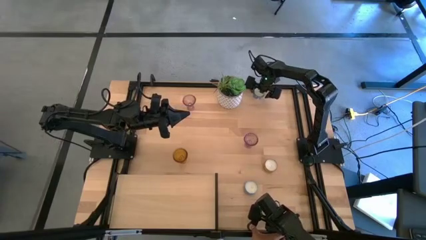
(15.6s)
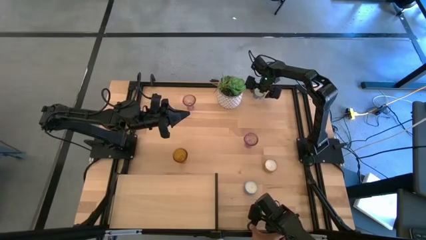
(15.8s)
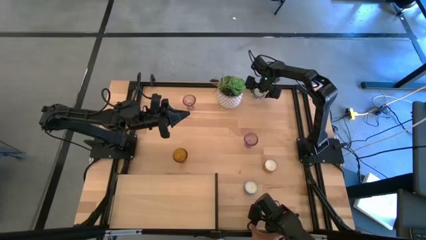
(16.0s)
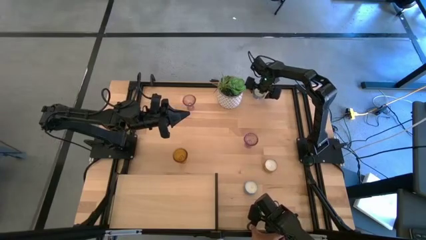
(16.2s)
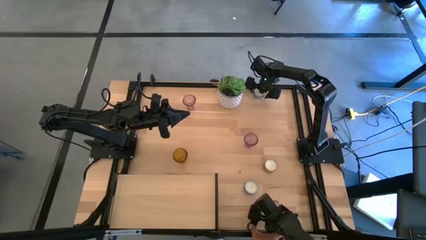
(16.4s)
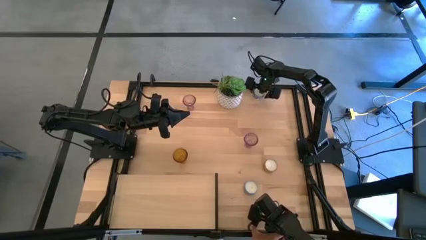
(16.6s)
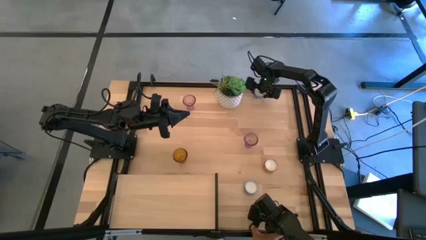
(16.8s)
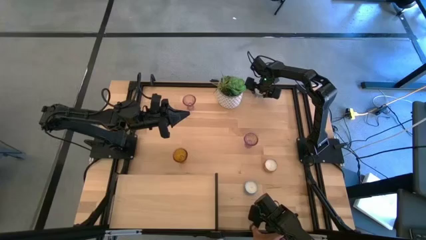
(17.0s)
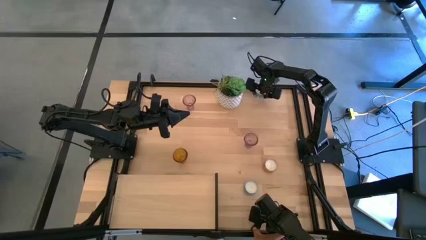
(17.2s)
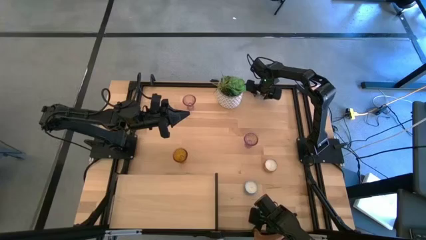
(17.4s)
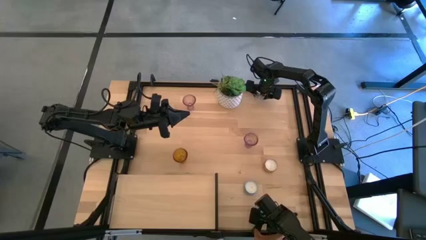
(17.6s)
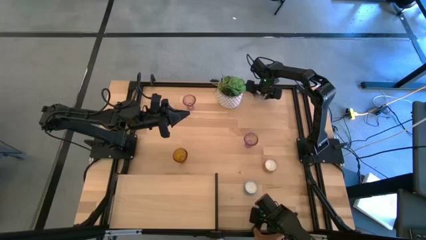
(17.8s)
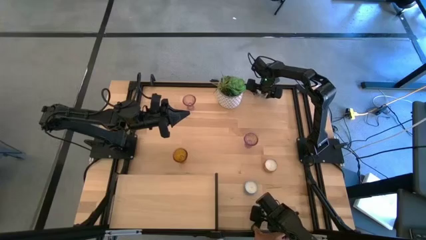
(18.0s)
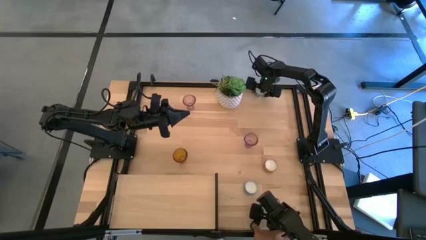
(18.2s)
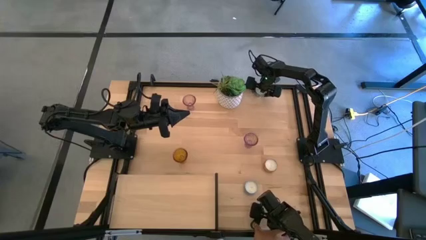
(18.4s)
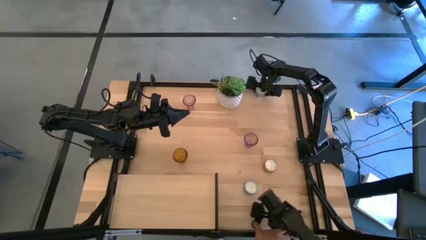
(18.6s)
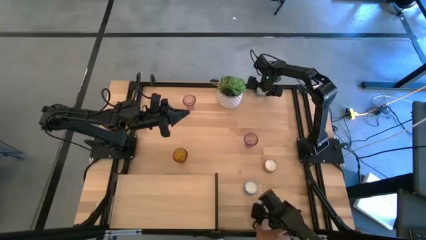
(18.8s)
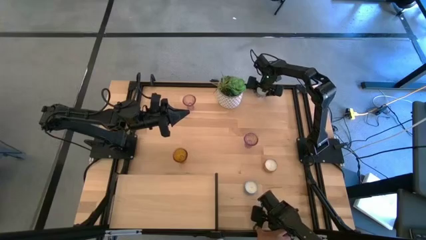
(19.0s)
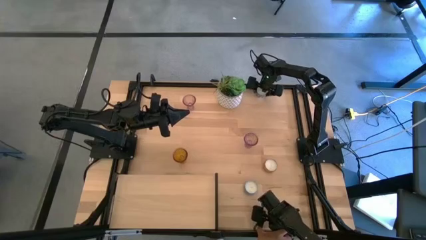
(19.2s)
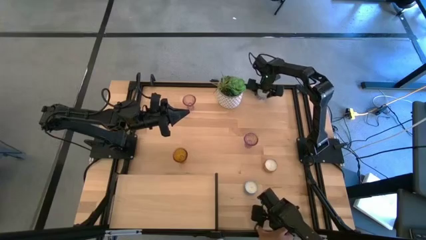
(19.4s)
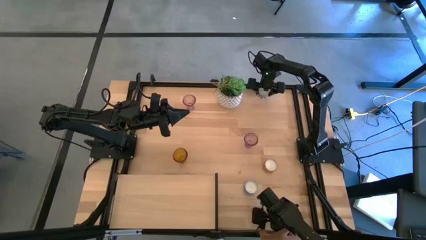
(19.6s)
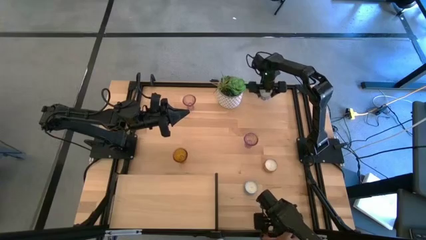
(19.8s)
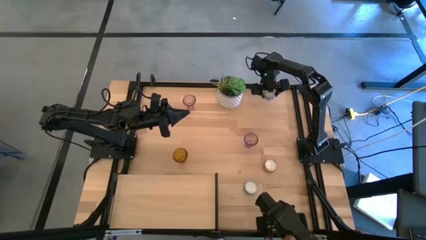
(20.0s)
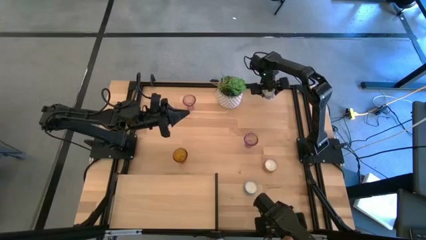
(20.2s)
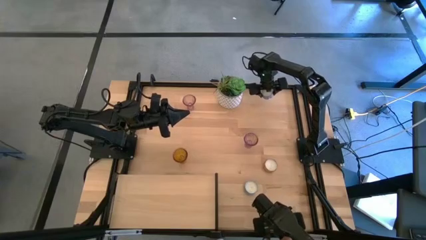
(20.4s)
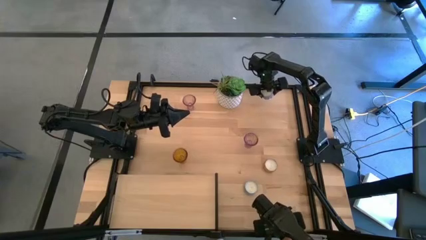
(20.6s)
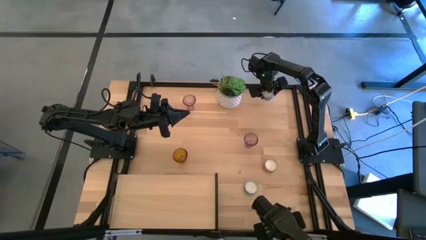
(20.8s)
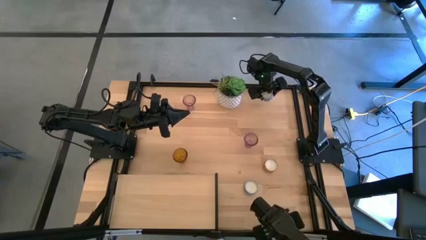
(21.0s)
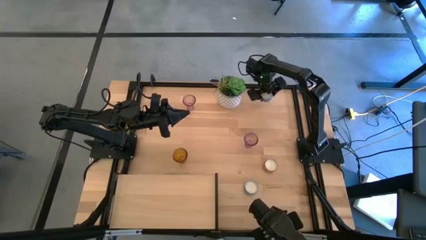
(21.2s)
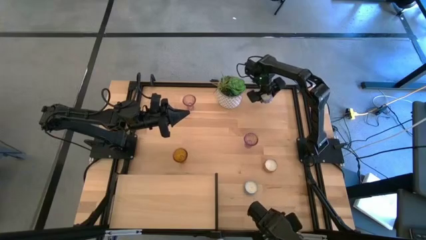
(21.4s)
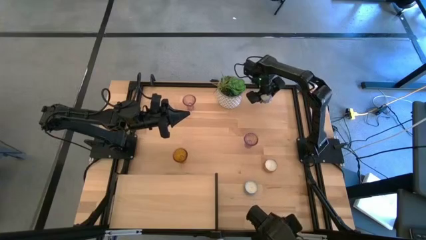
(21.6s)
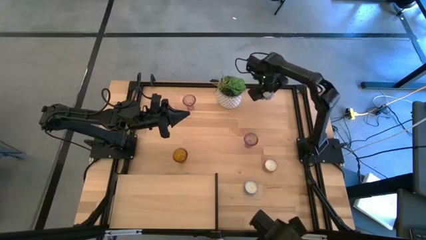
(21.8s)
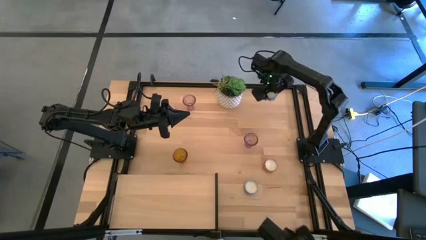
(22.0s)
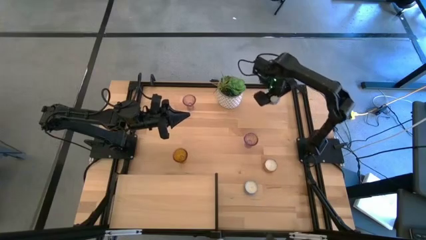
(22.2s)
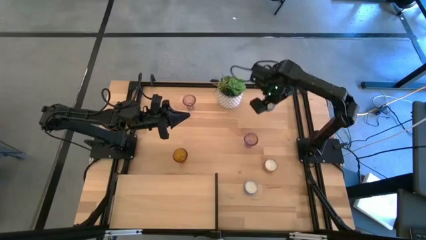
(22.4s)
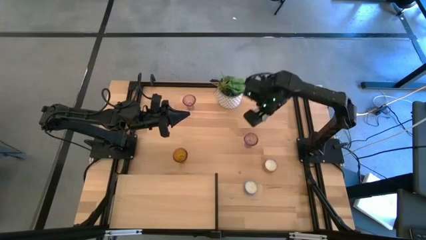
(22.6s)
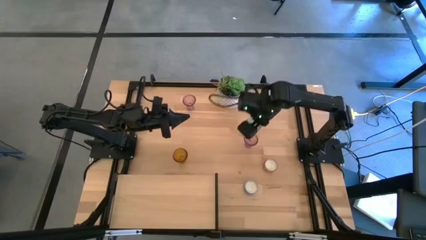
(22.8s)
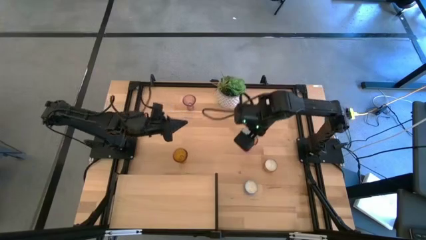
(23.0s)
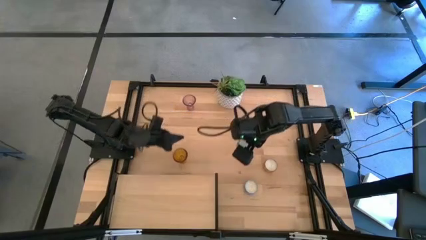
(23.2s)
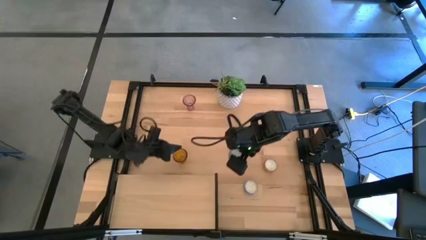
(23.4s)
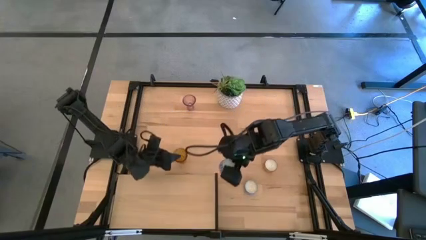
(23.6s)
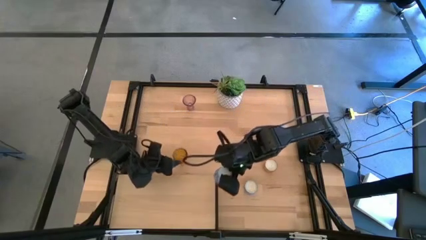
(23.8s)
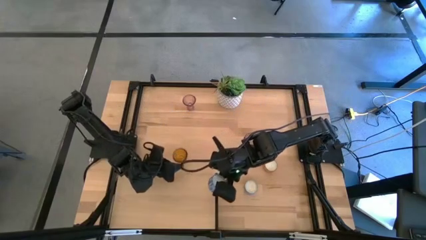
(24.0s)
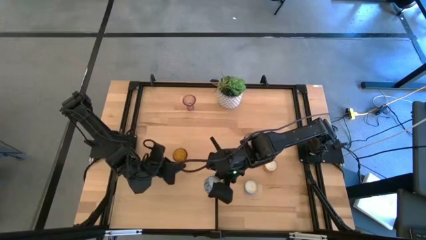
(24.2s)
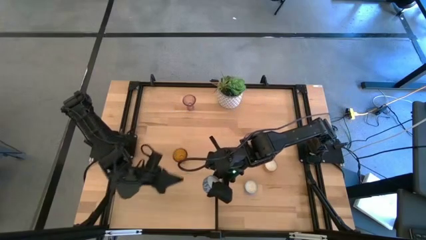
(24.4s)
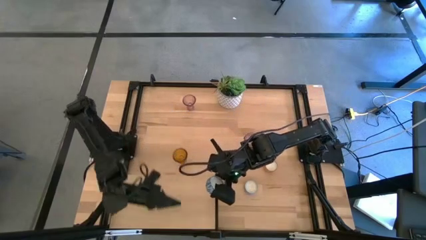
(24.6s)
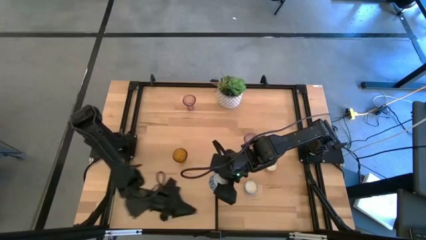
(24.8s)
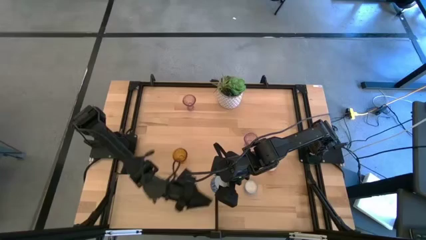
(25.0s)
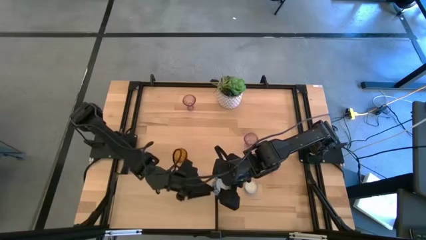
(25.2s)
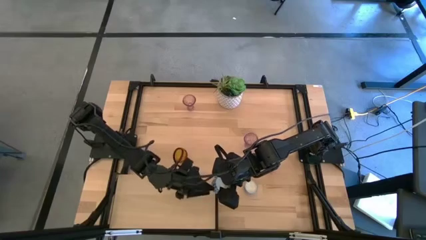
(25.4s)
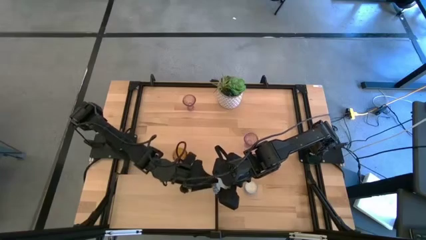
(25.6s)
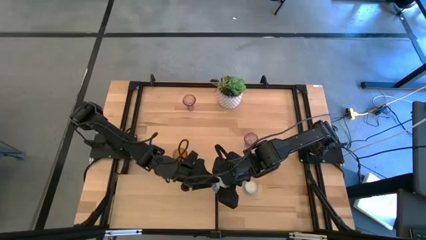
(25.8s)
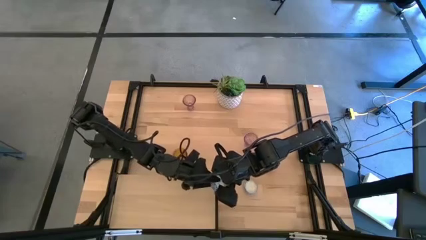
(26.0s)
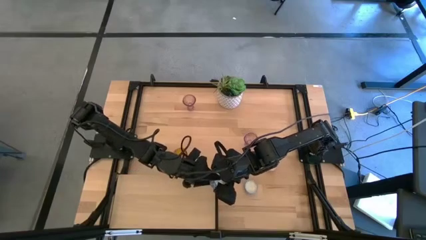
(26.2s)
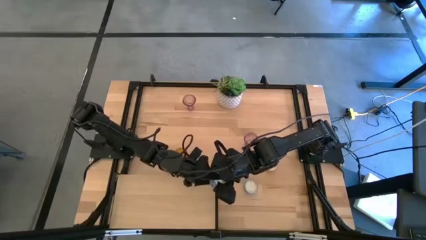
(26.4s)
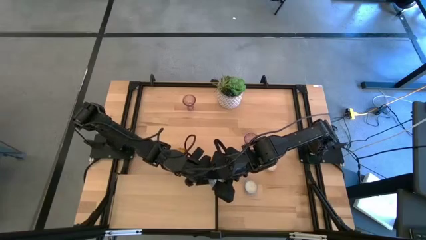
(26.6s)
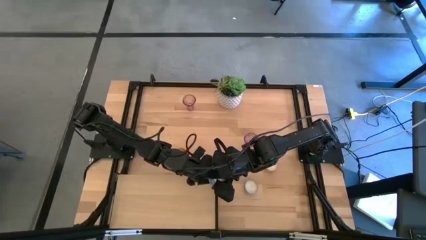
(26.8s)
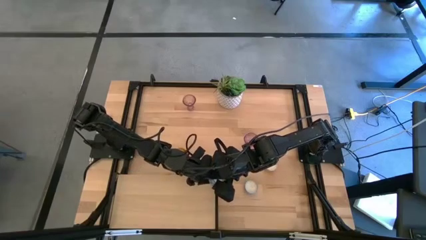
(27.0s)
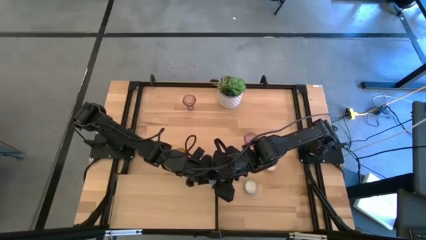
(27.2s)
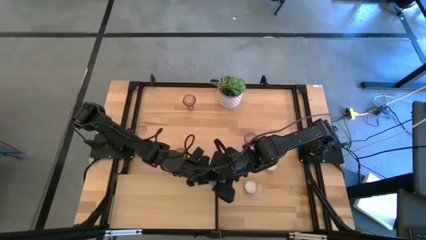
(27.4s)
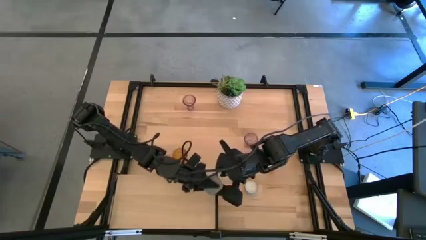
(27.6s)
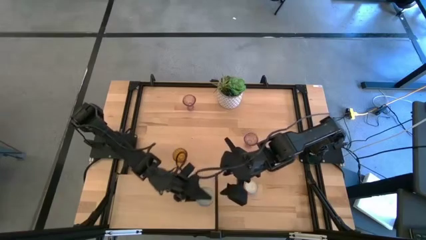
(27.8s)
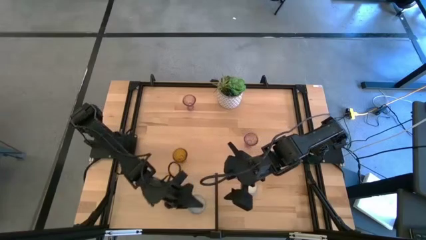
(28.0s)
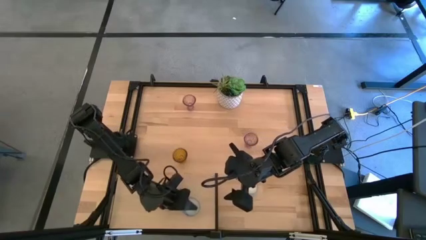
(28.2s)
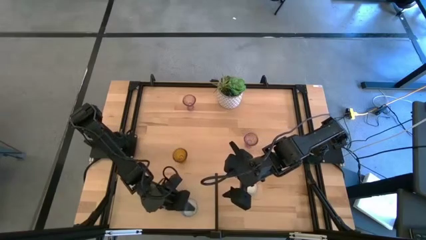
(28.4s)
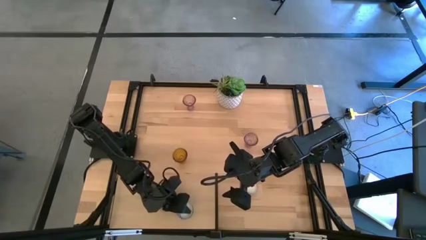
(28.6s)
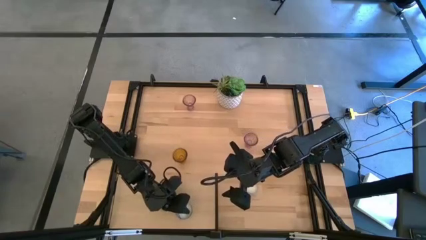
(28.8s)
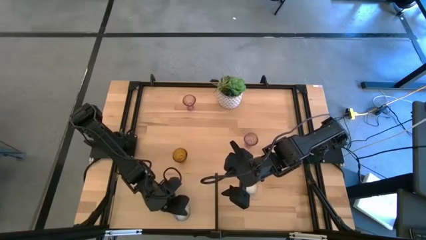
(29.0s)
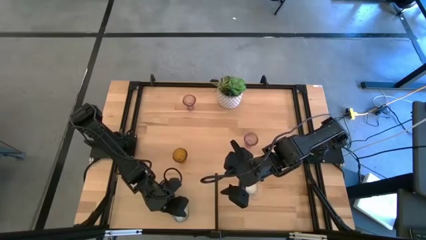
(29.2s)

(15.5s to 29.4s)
Task: Pick & Place candle stick holders
Put the top blue scented candle on the shelf

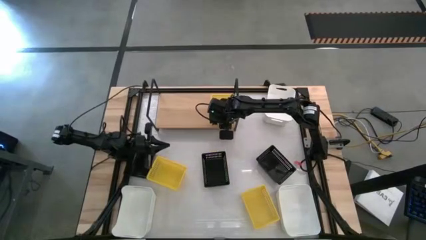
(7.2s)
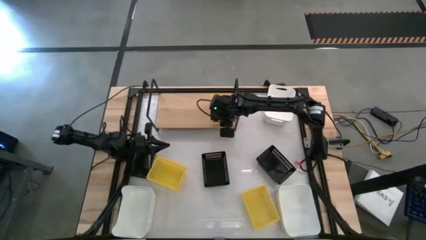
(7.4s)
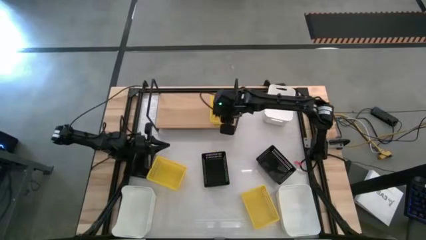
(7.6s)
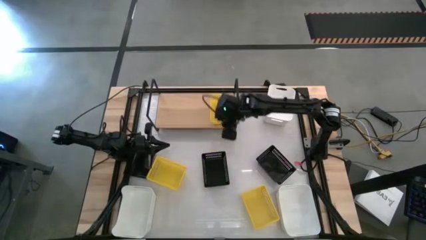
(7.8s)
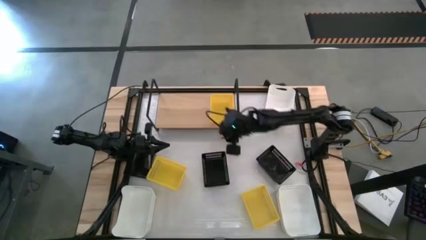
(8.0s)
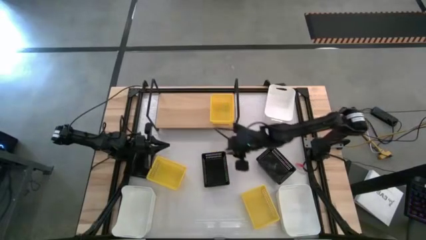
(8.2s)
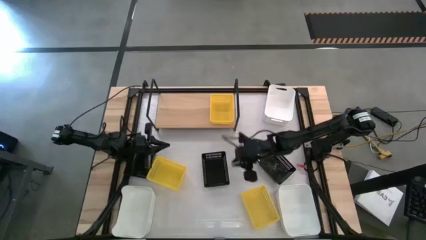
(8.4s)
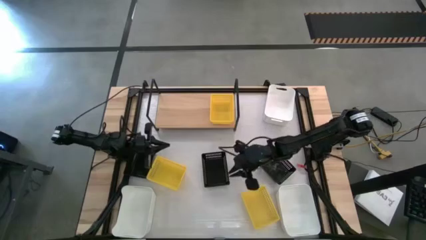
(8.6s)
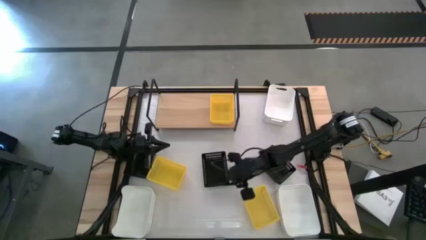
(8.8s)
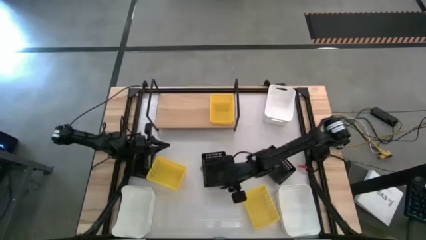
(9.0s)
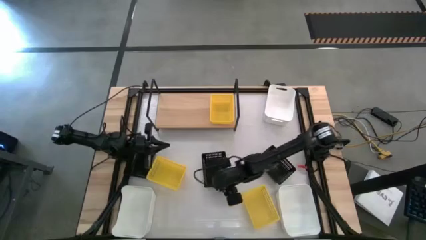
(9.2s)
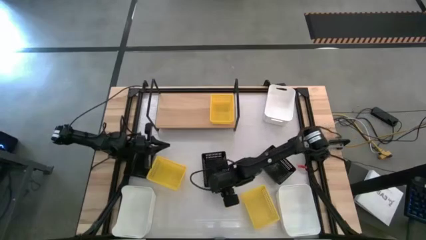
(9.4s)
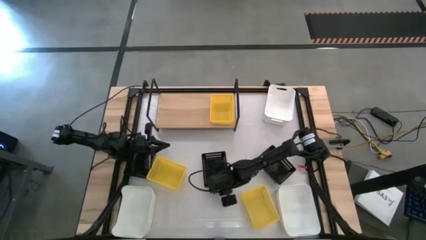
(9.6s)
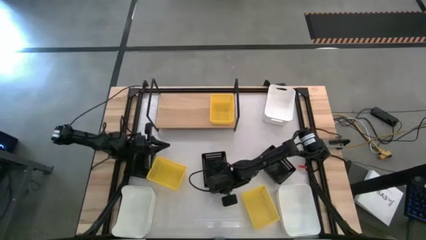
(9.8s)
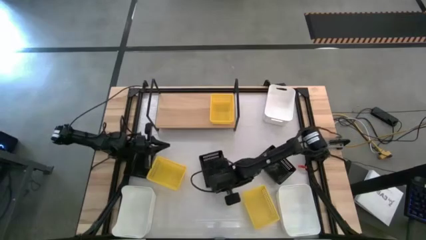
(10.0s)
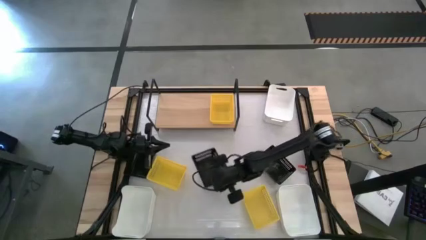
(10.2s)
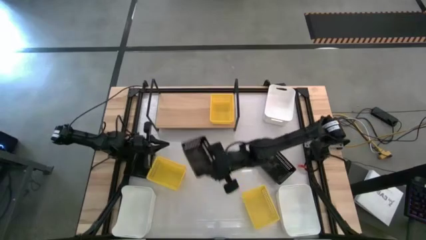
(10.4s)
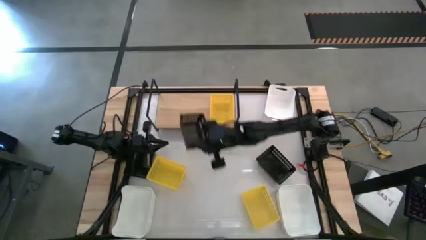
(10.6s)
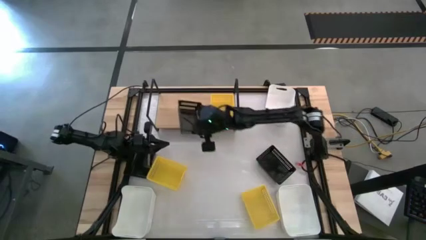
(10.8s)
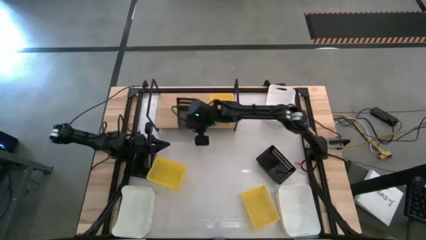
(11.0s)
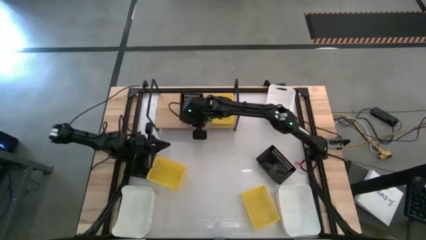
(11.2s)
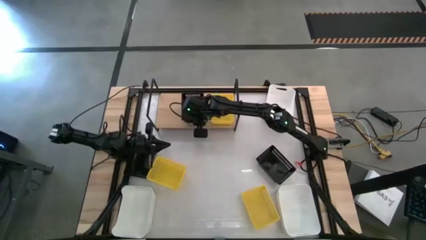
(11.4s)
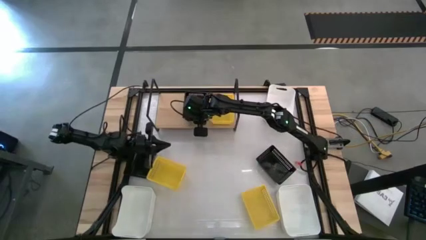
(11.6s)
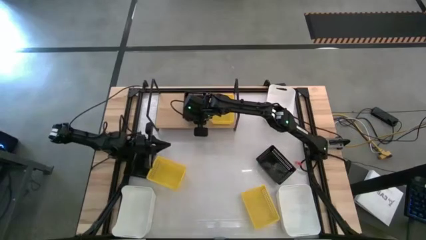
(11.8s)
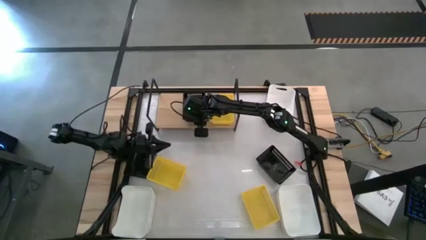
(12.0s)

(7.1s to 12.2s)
Task: Stack baskets on shelf by color
Put the middle black bin on the shelf
